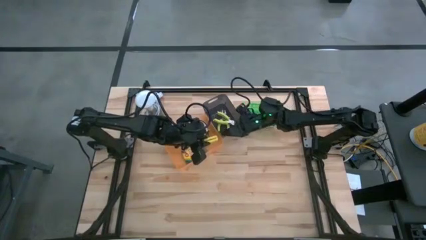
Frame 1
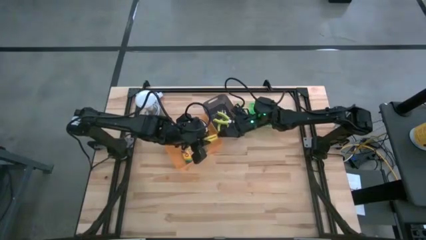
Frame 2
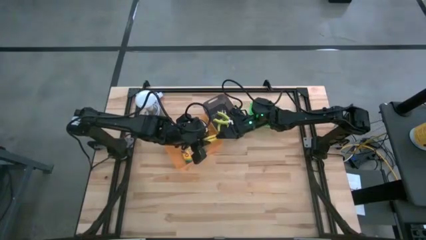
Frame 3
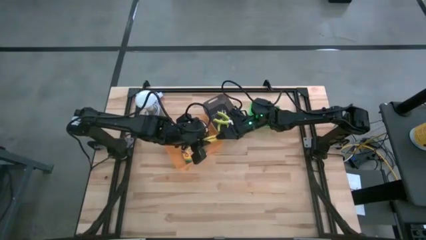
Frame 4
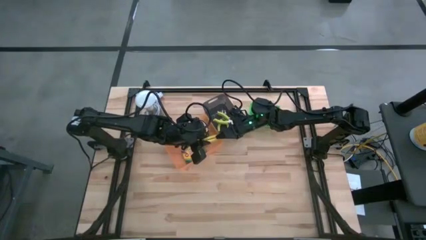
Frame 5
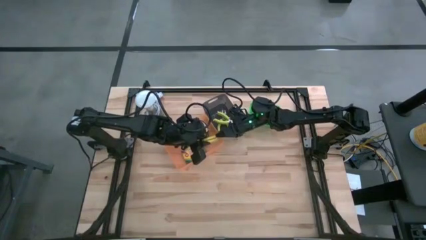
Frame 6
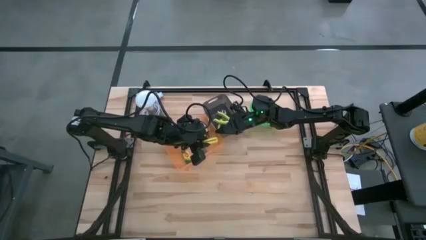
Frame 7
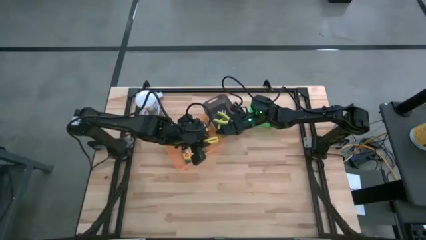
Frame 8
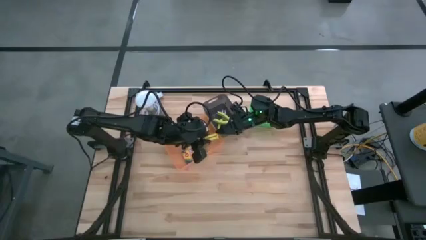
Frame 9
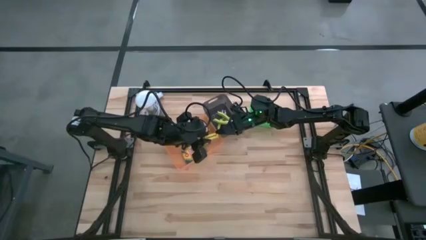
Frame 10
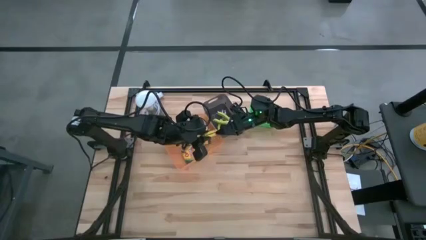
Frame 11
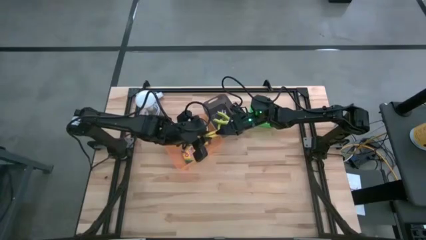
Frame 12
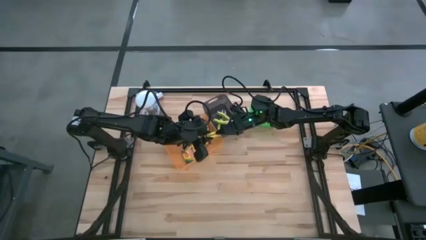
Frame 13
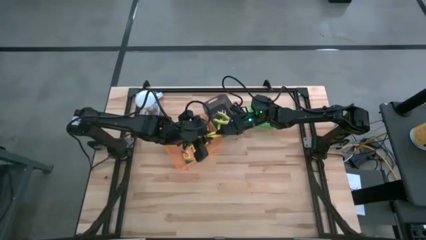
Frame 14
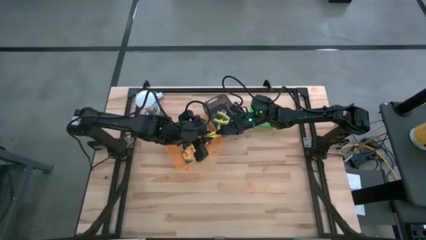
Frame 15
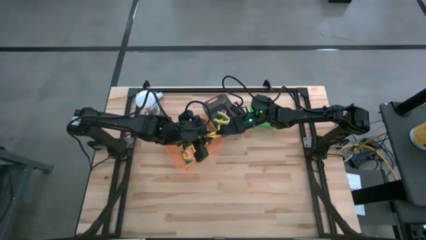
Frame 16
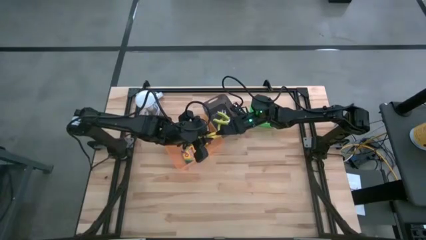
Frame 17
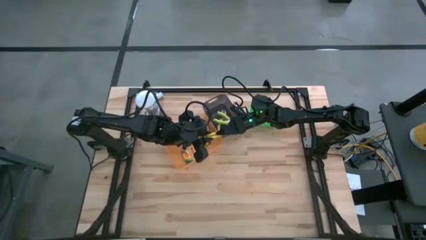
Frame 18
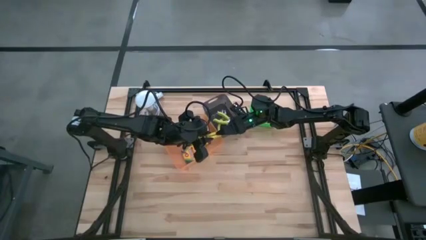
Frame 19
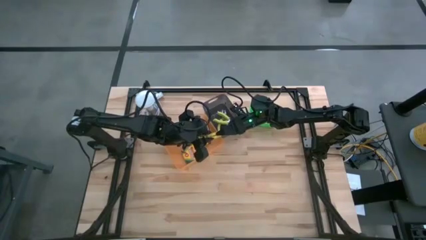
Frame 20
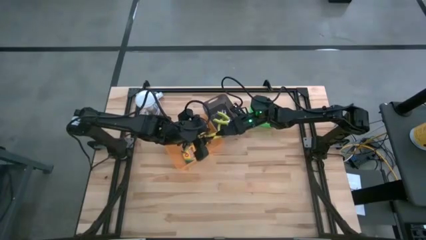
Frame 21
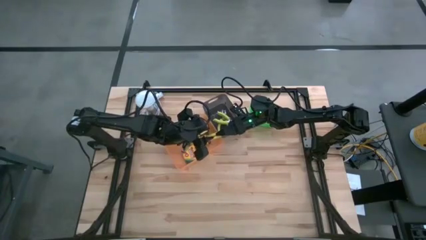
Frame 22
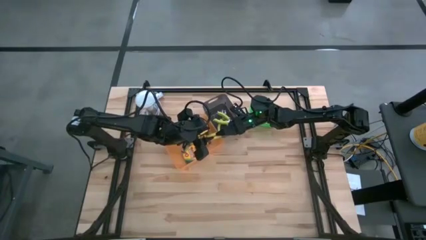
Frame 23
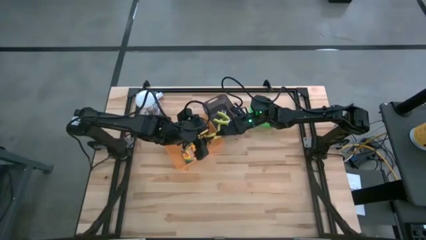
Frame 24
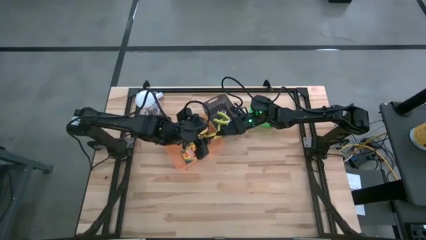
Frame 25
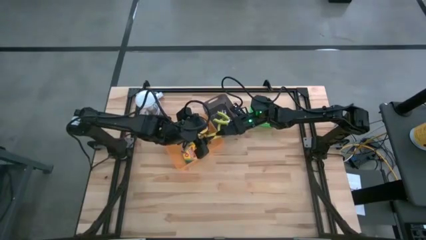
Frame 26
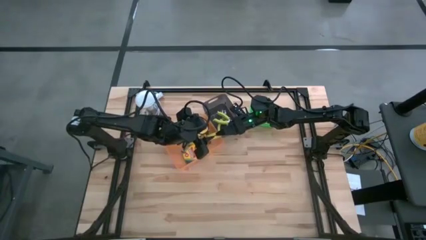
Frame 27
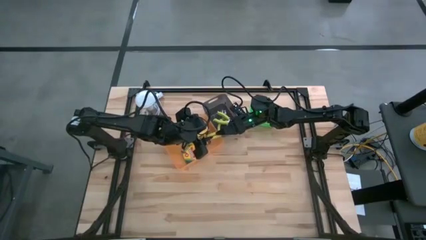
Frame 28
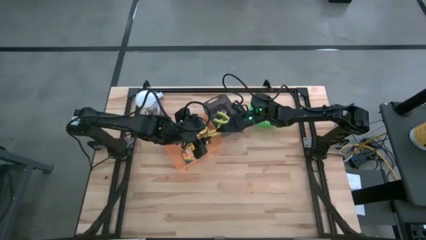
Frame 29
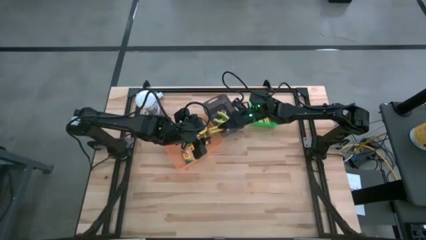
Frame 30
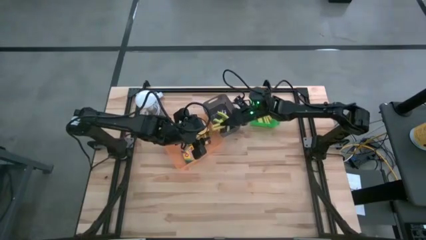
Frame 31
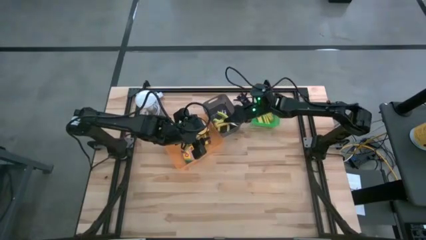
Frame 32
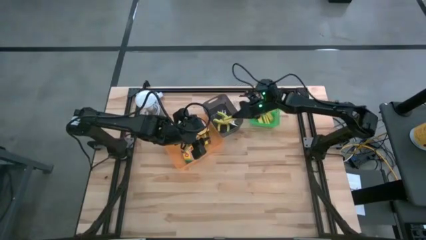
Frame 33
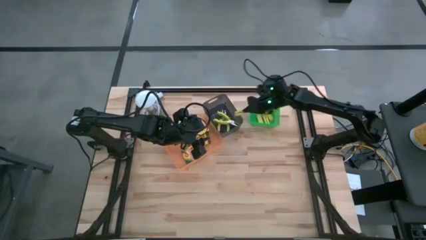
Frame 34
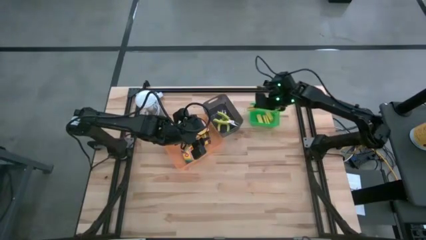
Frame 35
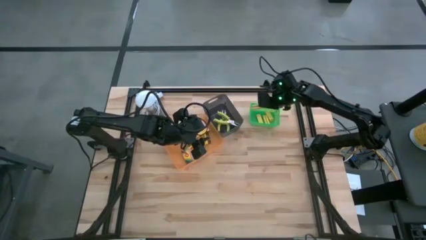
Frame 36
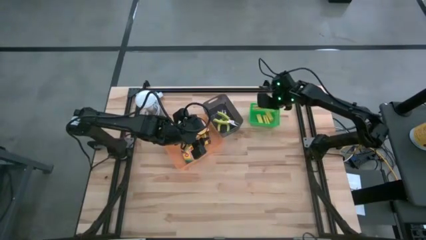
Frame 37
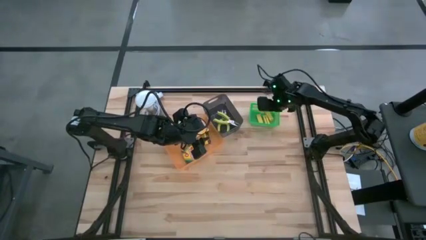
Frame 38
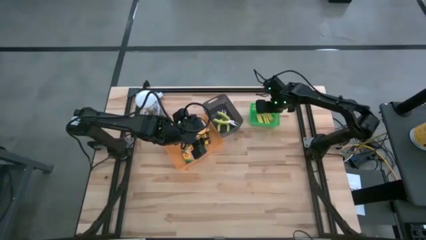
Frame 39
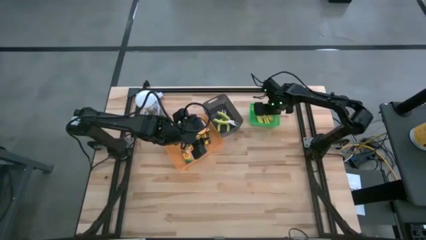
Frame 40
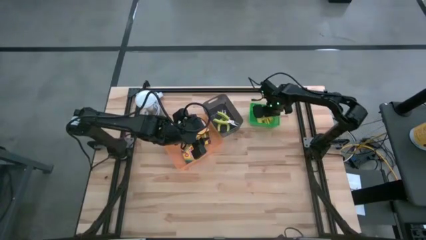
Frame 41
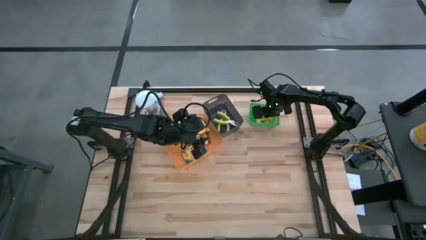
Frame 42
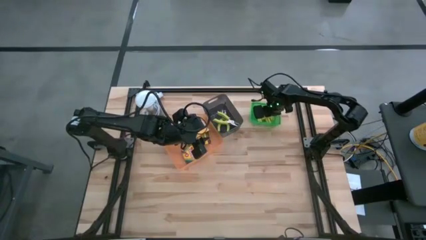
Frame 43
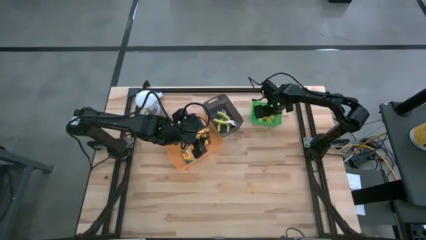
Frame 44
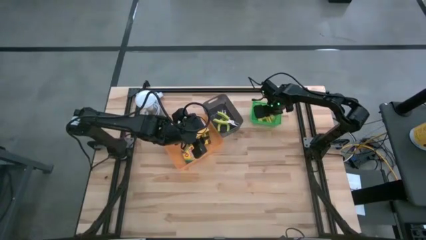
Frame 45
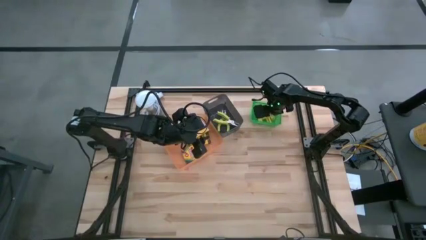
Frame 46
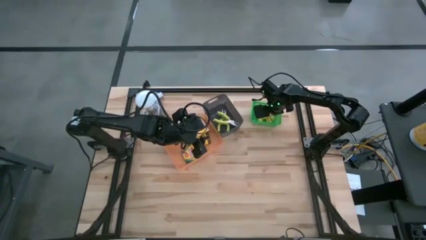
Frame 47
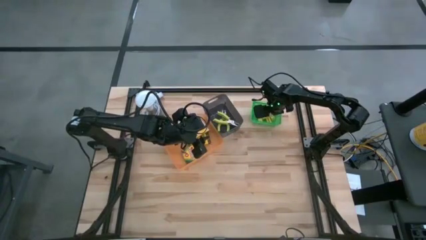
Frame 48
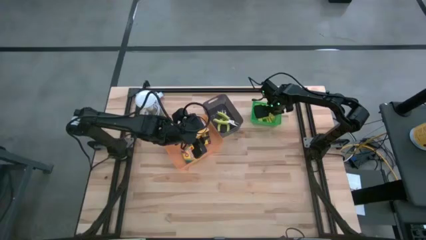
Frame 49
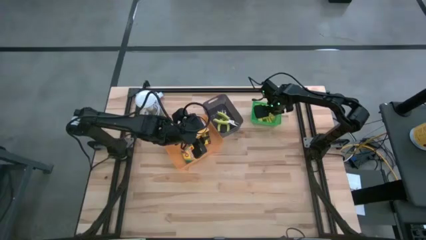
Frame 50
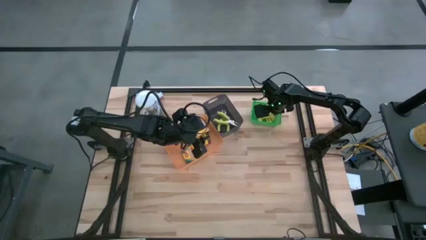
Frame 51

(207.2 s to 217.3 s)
Task: Pick & Place School Supplies
Put the yellow eraser into the green bin

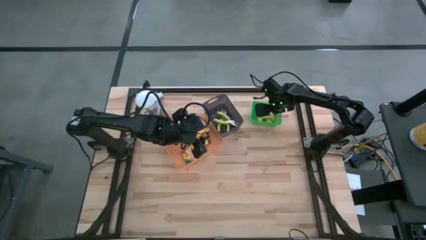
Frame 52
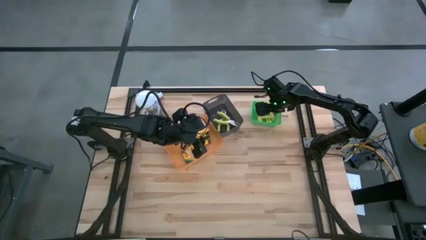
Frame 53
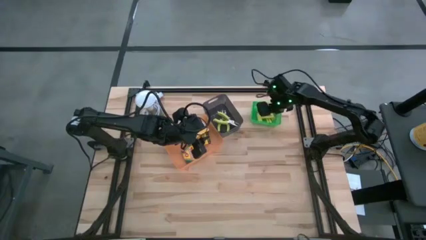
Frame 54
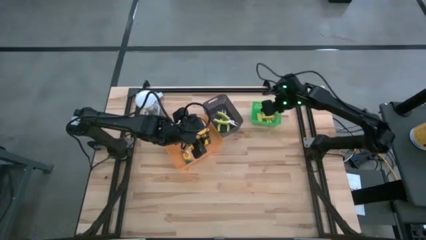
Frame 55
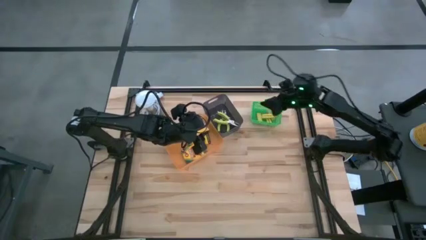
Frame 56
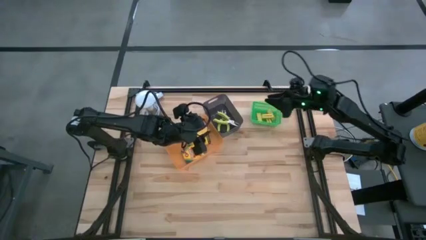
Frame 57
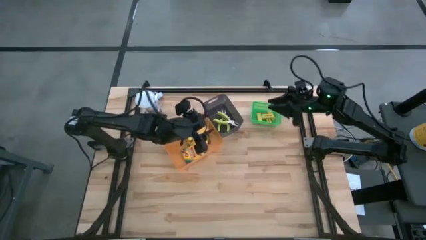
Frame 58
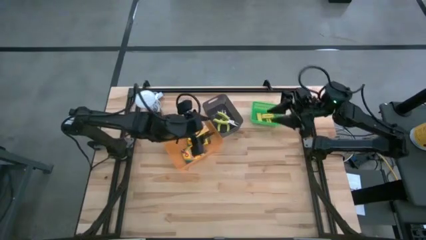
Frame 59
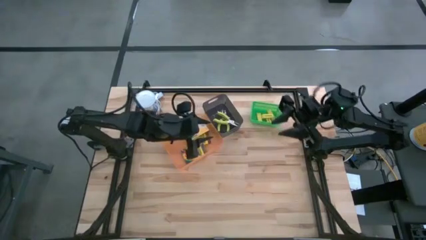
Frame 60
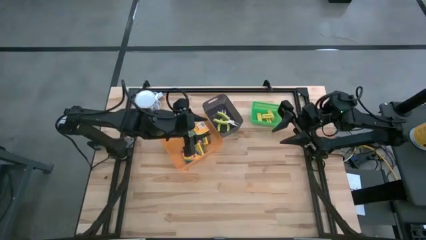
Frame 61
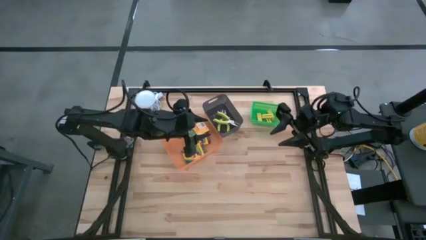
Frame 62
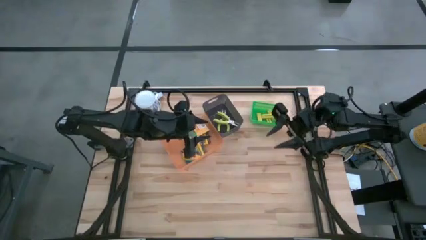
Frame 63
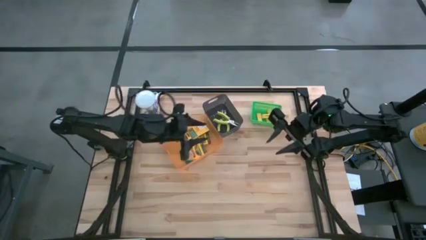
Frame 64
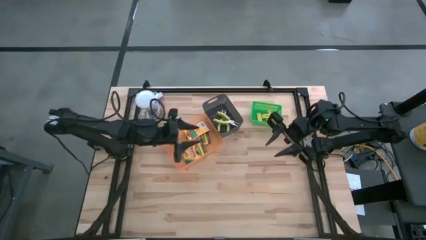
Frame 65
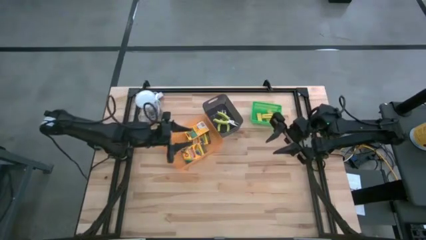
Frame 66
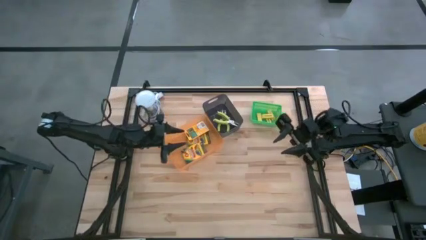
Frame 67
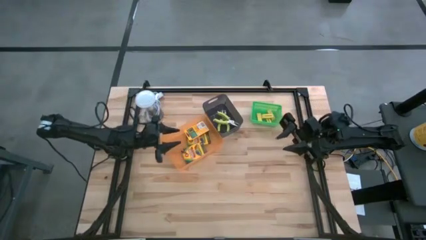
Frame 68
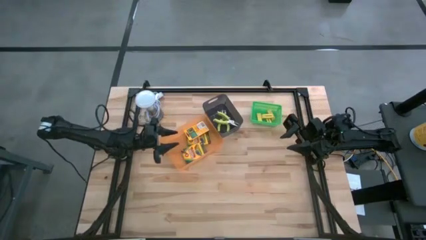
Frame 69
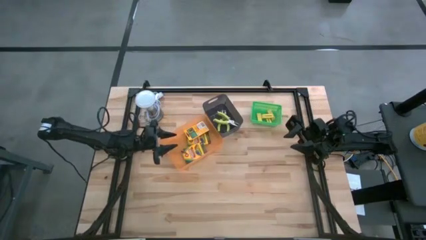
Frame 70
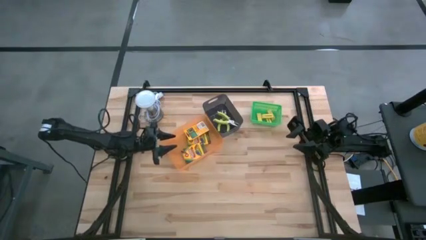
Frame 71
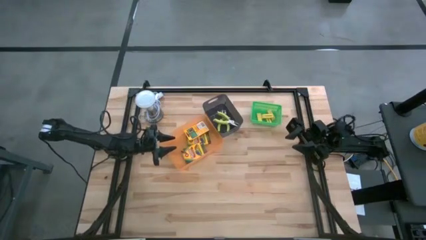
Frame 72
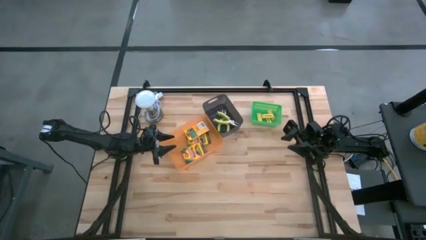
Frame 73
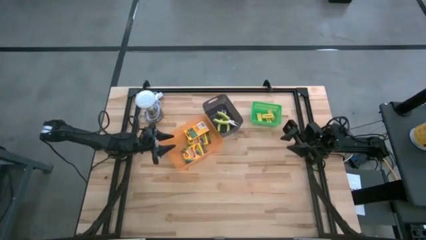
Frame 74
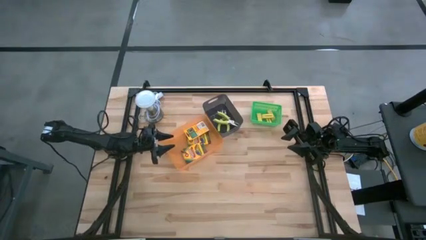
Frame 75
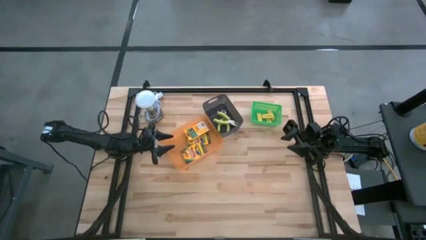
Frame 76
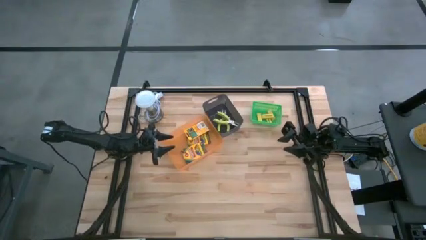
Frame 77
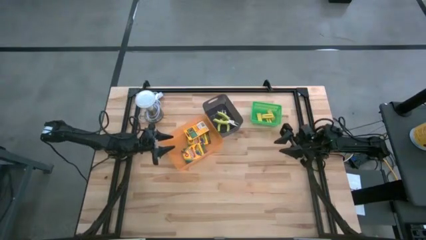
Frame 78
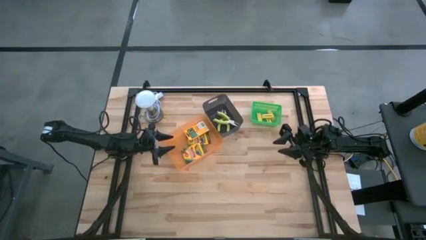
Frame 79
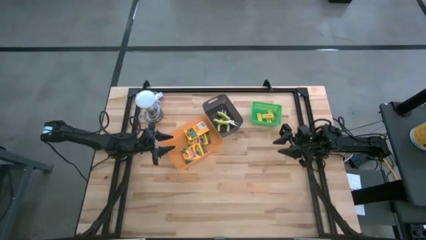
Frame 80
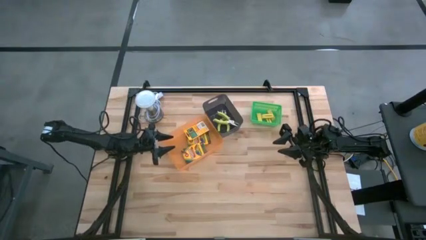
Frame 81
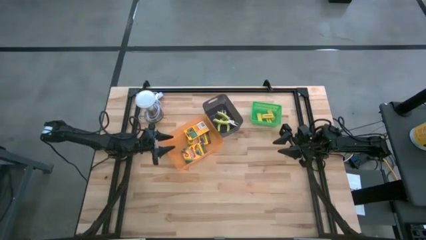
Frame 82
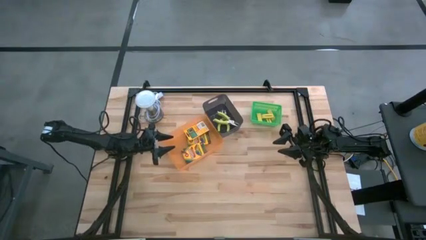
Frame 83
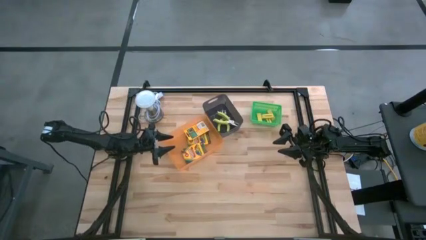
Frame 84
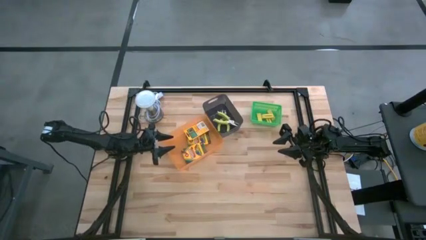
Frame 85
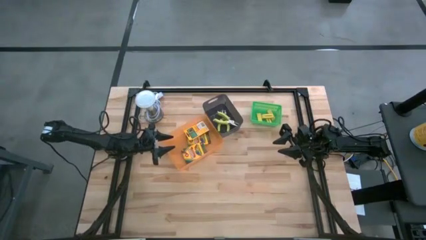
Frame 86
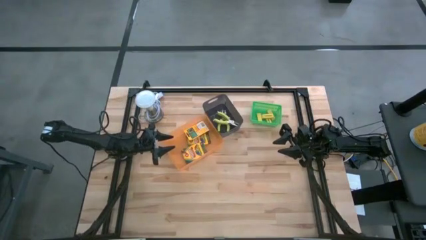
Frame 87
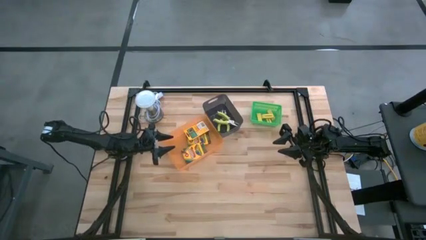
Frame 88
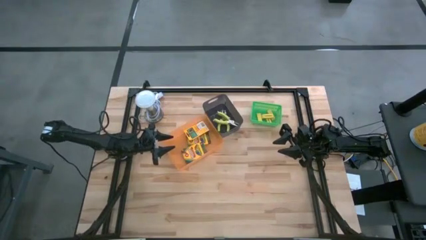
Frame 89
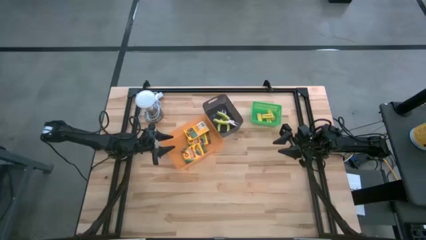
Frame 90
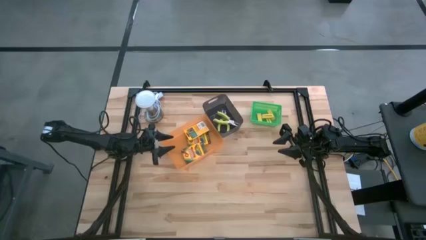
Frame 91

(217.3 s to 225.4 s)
Return to Home Position
